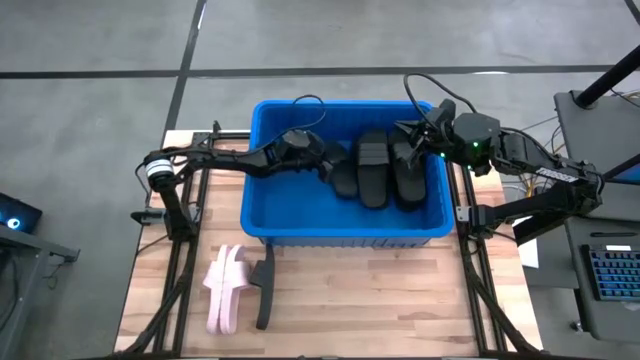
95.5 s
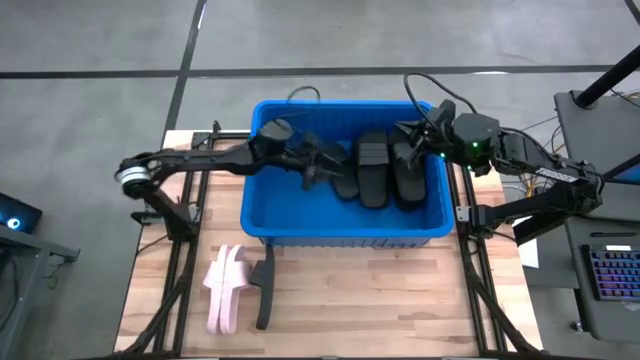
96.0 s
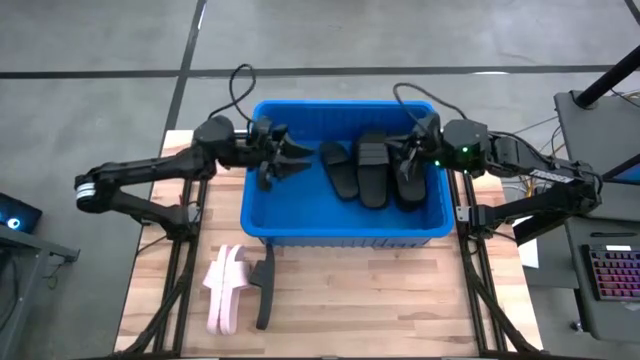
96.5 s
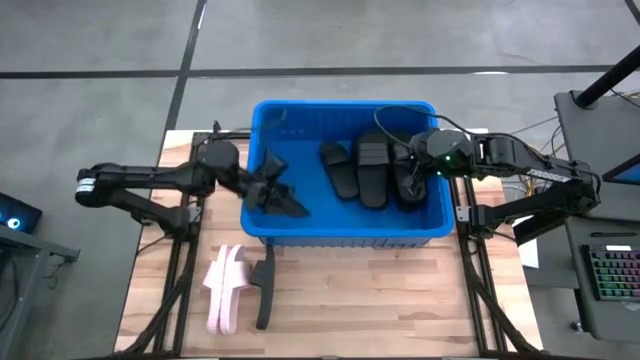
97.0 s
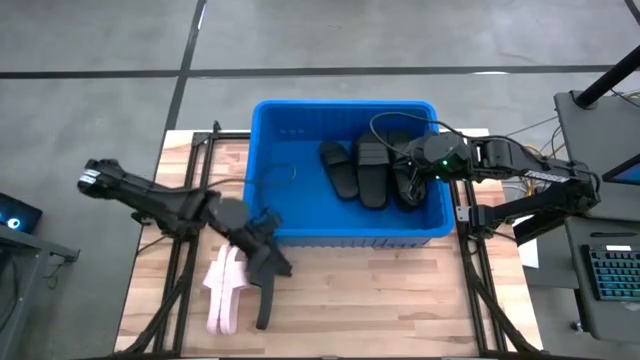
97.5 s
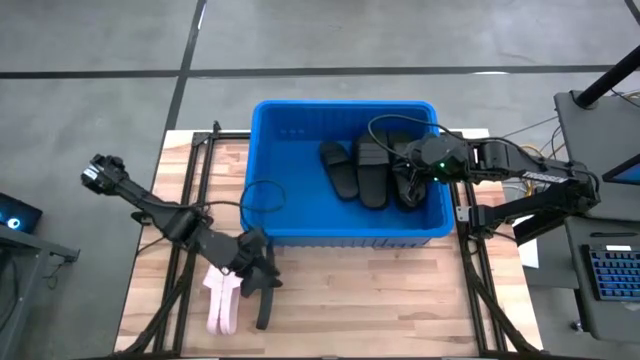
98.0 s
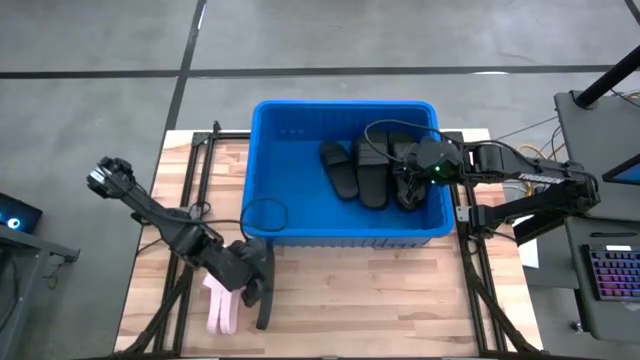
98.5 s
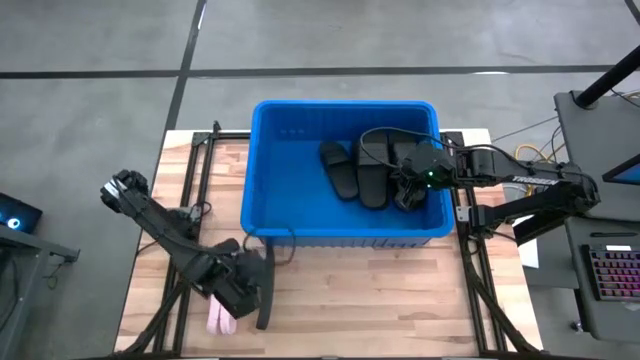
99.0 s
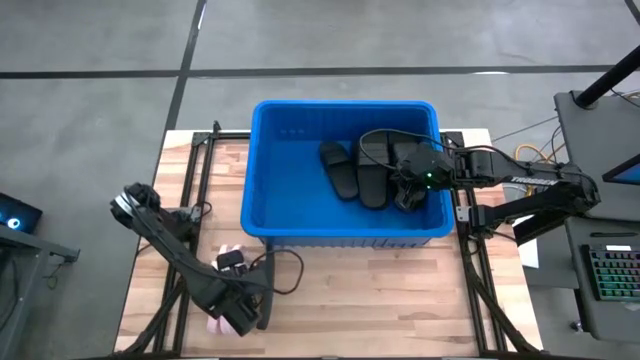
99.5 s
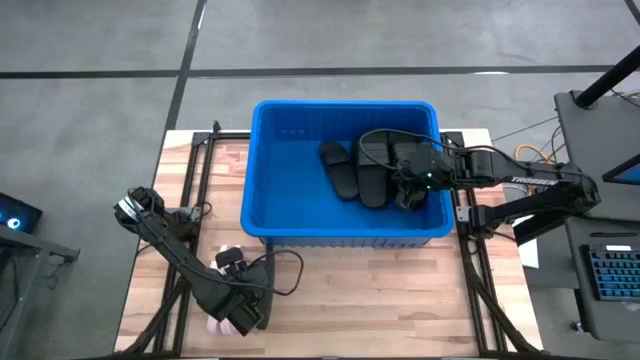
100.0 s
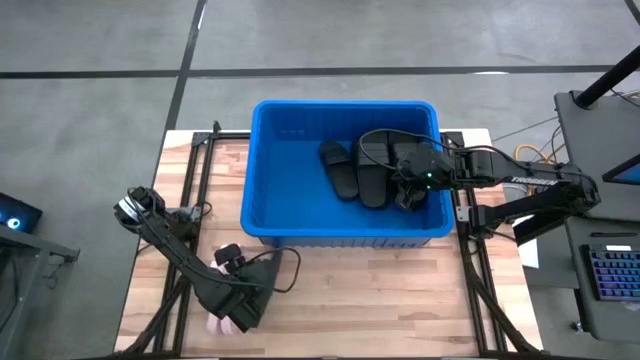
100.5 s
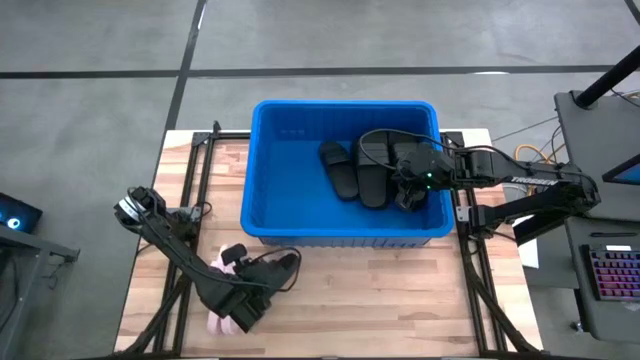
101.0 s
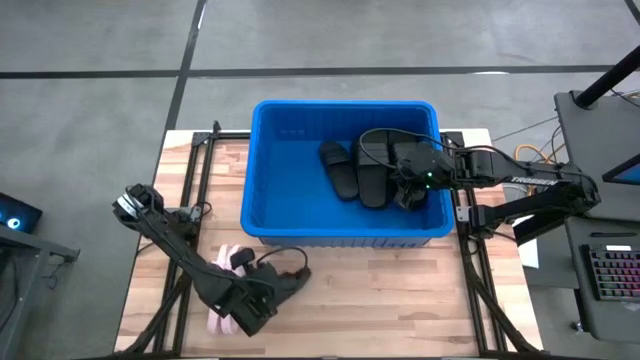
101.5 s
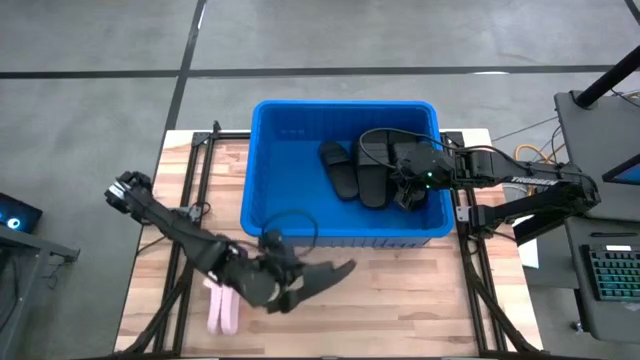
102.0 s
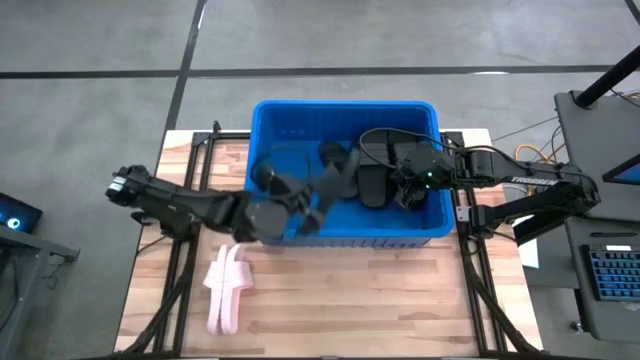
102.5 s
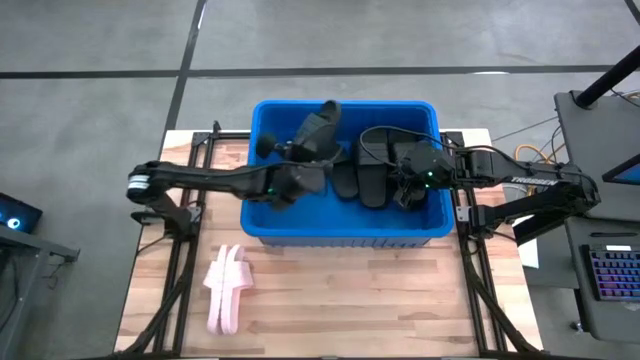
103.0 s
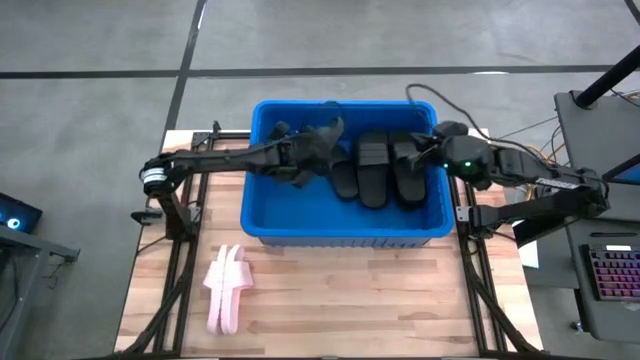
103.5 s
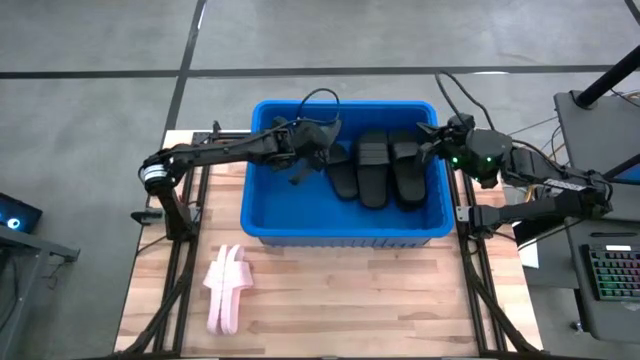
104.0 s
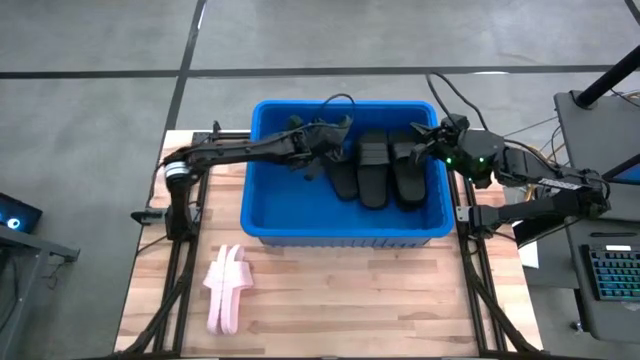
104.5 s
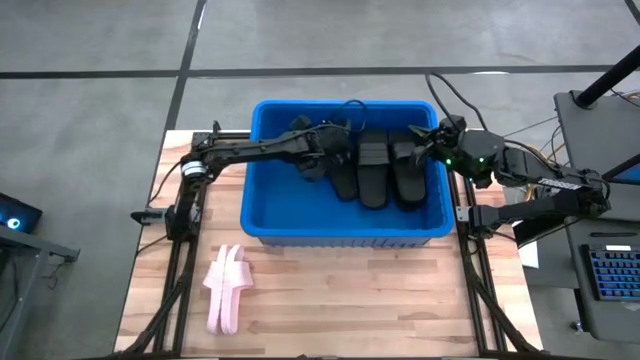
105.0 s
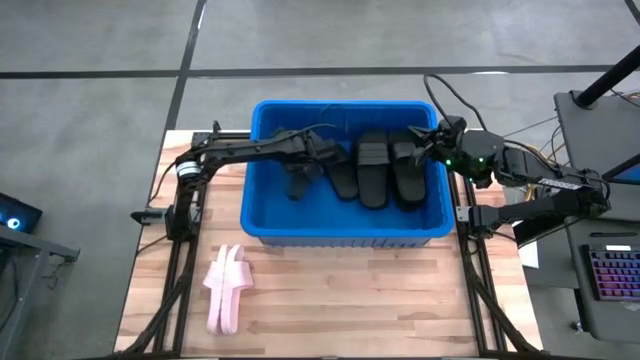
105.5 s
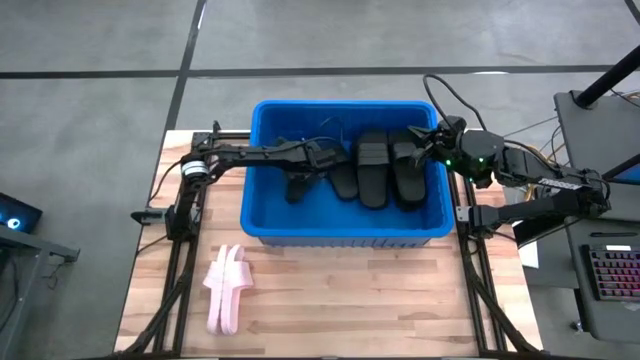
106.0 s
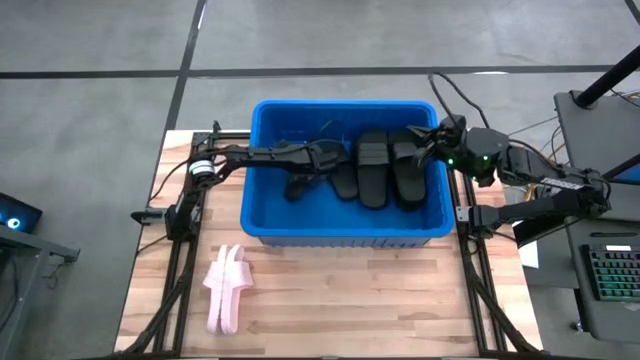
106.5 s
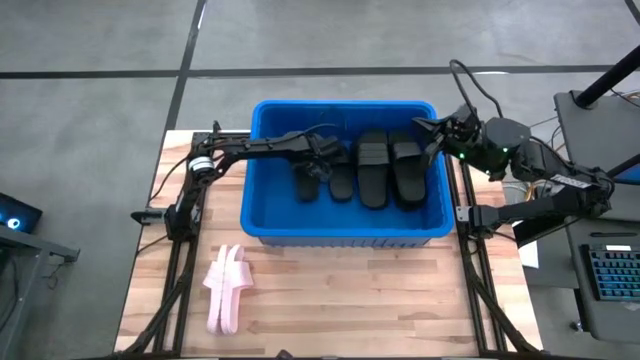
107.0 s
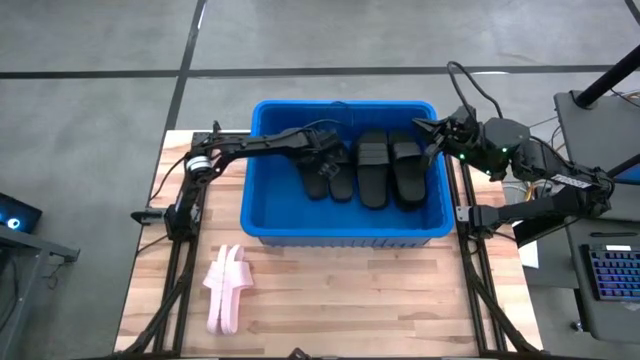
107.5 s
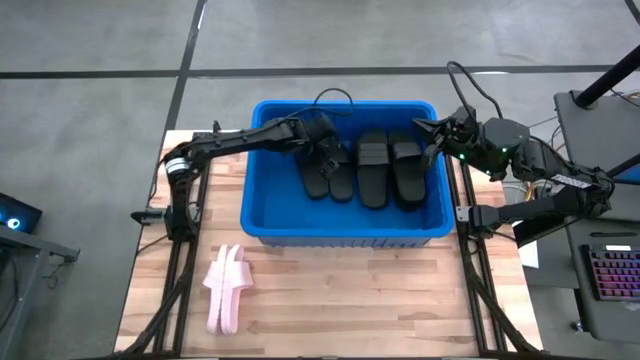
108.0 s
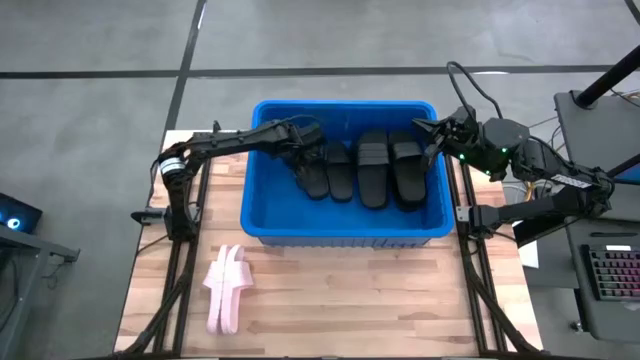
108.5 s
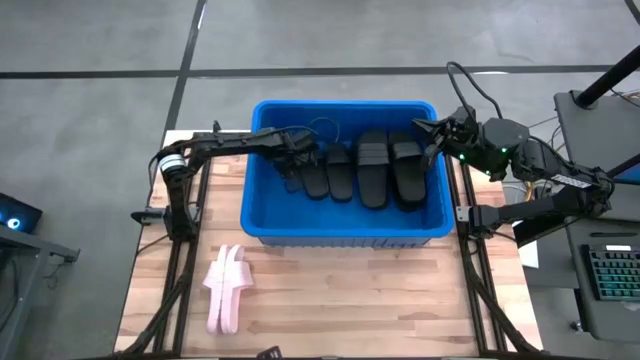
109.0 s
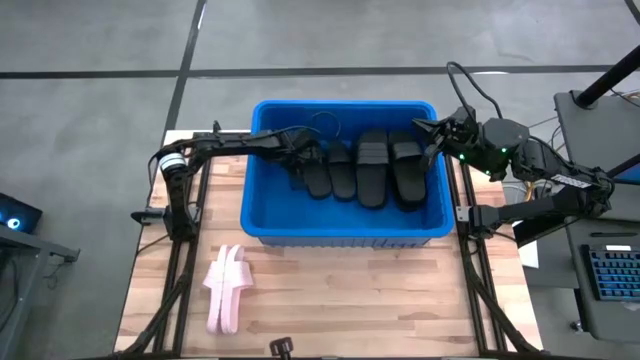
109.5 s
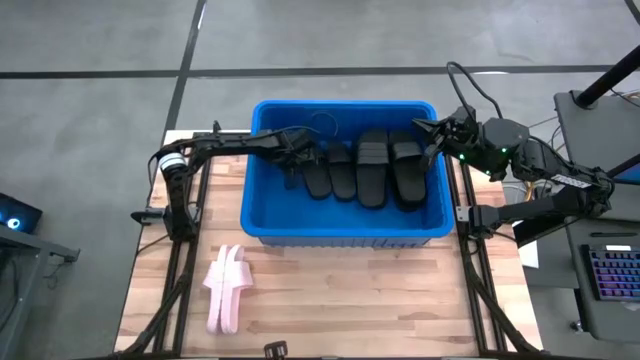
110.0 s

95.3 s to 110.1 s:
Task: Pick and place slides into bin
Put the black slide into the bin

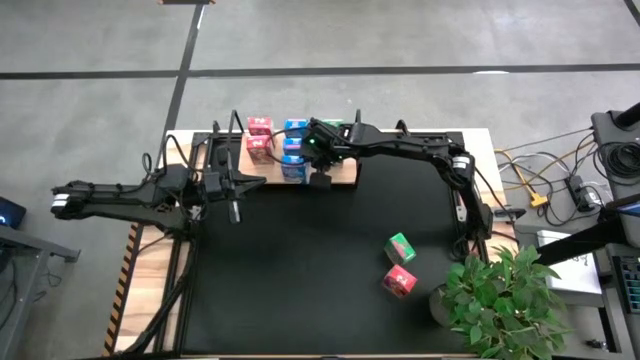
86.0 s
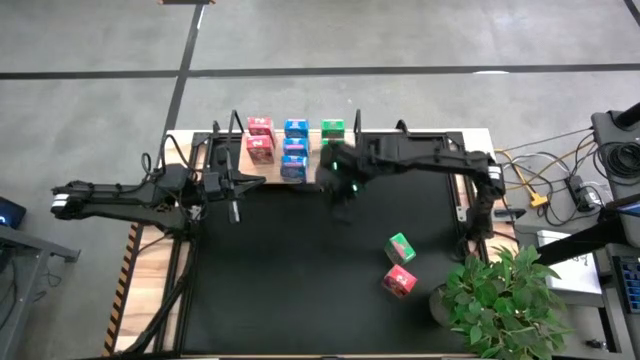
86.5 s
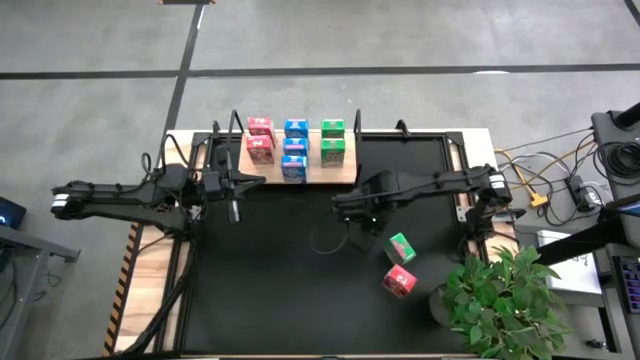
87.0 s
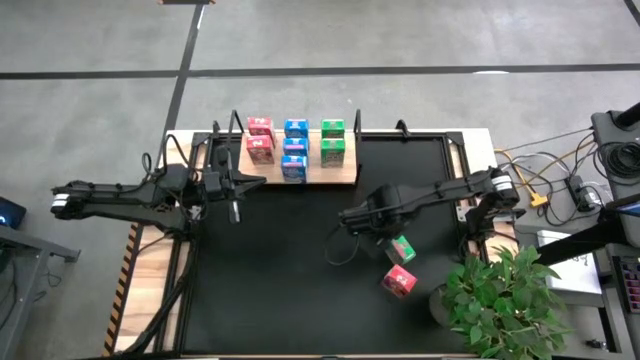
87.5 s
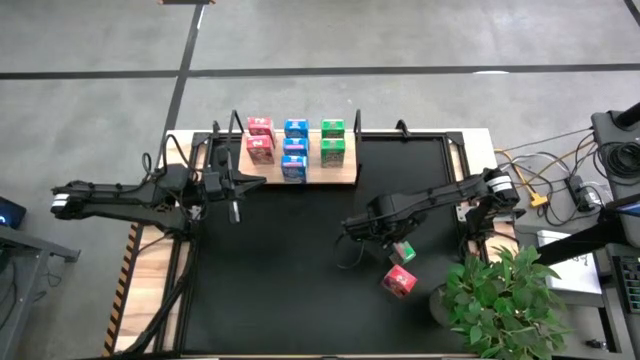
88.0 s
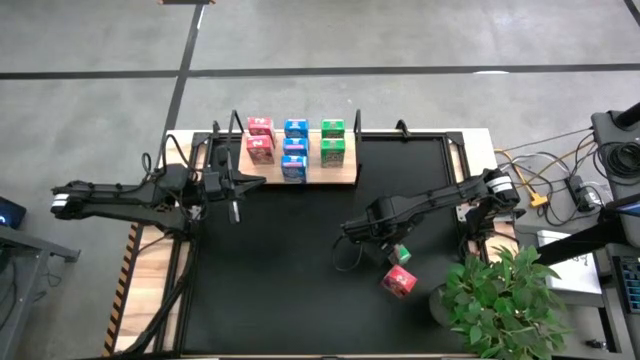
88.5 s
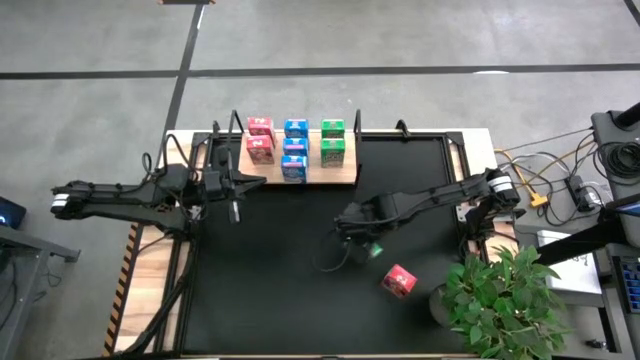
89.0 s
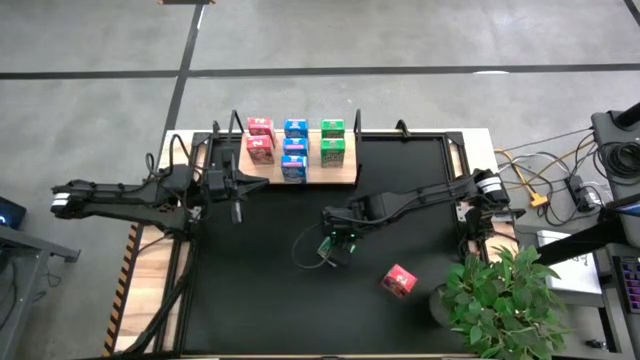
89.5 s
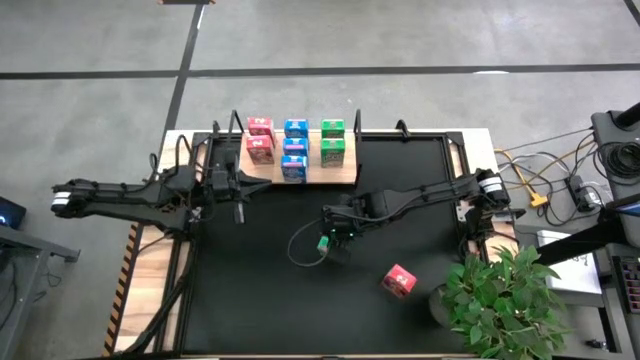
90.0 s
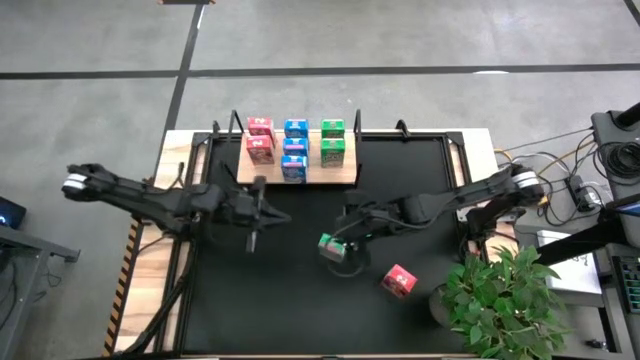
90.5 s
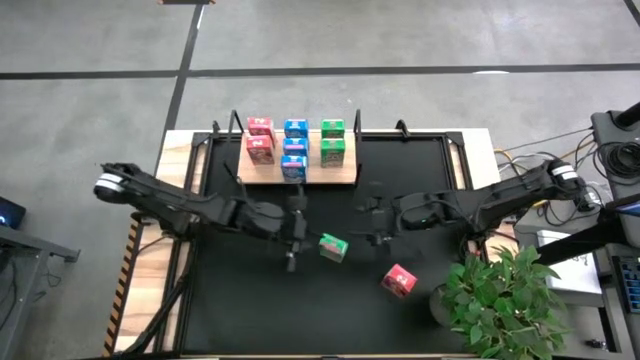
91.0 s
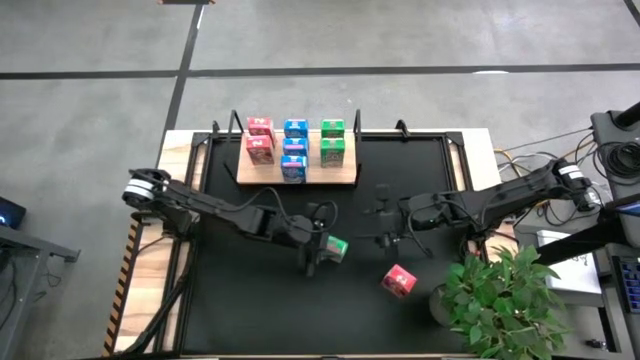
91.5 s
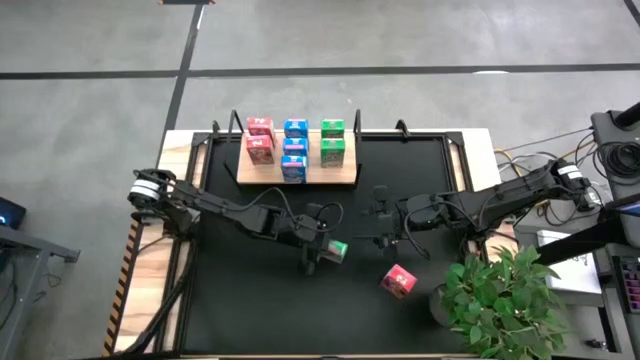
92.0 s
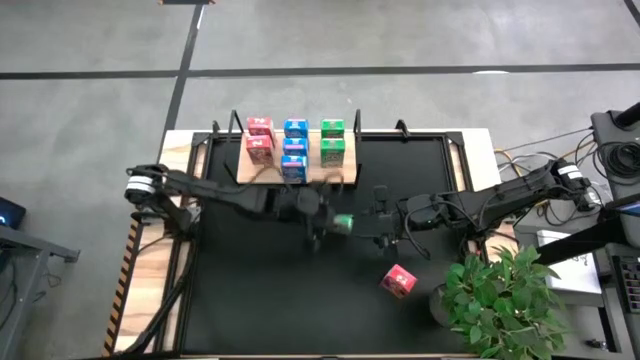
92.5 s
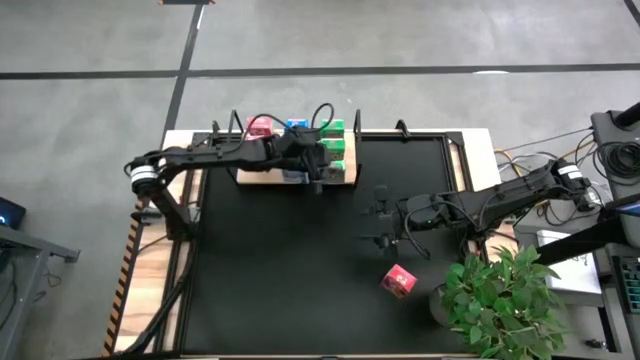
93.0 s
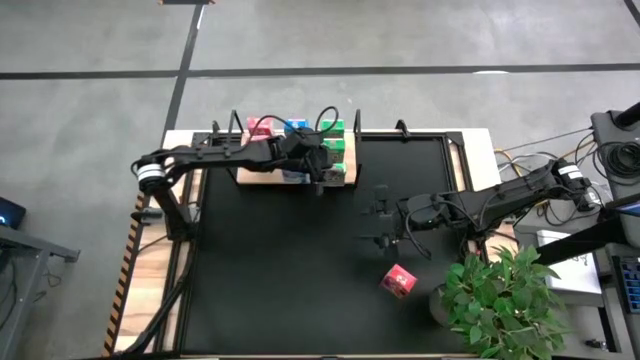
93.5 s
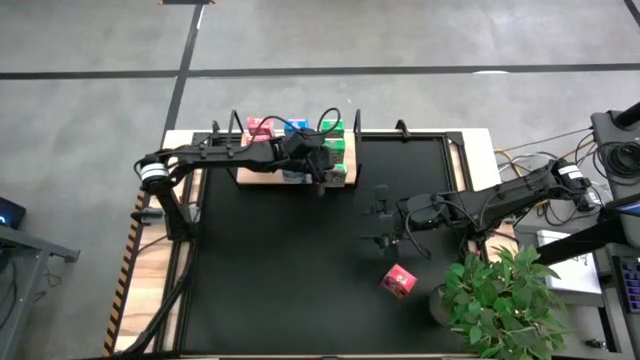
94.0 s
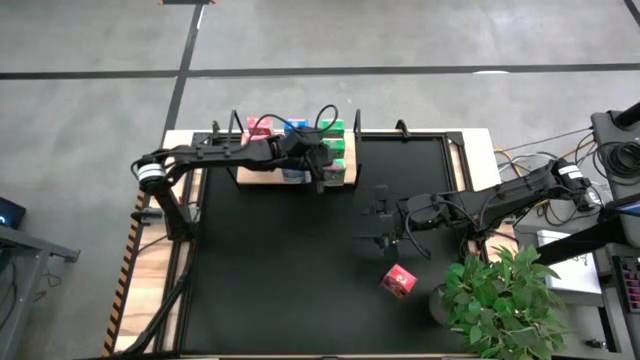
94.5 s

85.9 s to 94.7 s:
Task: Stack cereal on shelf
Put the green cereal box on the shelf aligned with the other green cereal boxes
